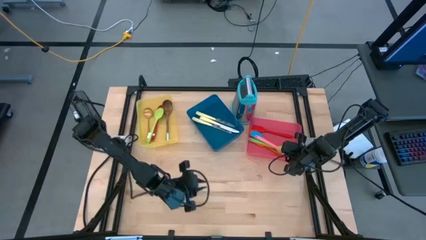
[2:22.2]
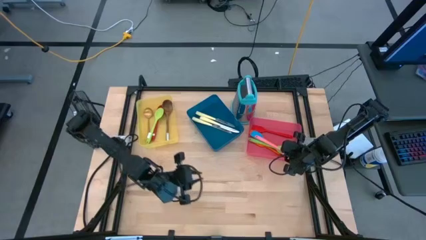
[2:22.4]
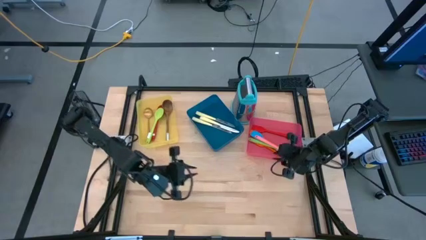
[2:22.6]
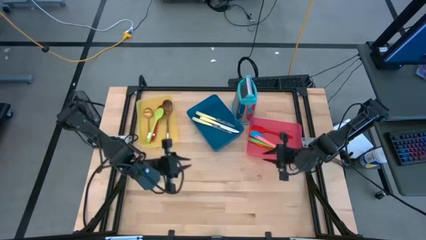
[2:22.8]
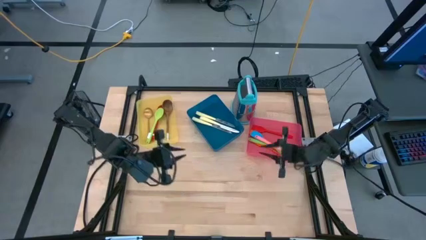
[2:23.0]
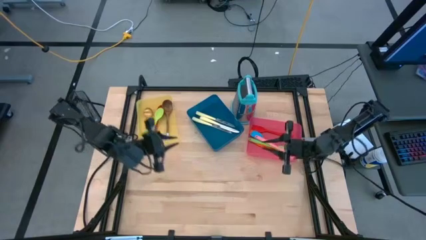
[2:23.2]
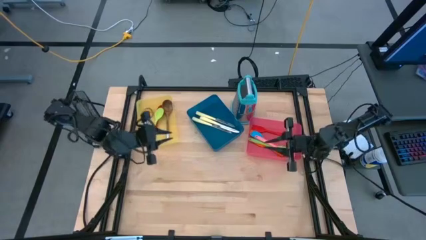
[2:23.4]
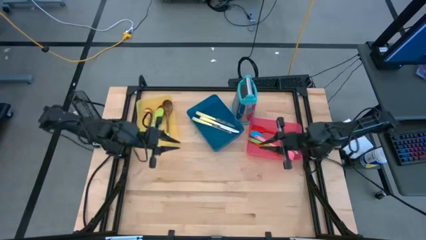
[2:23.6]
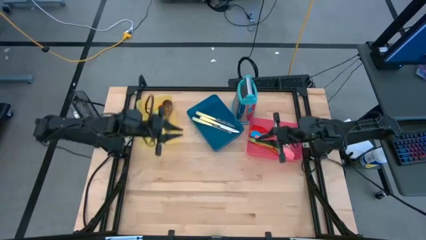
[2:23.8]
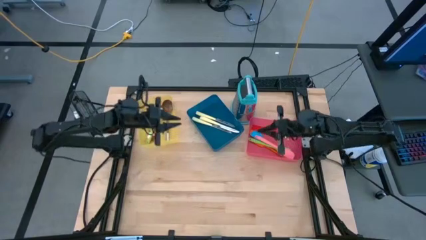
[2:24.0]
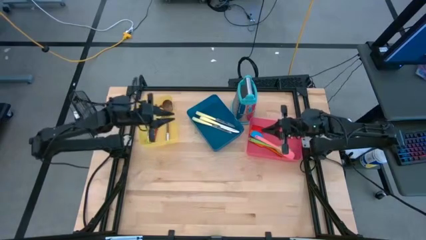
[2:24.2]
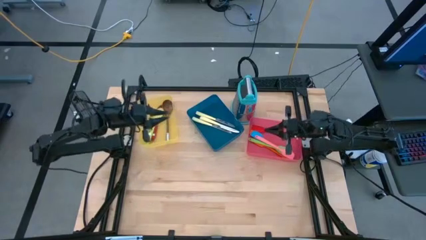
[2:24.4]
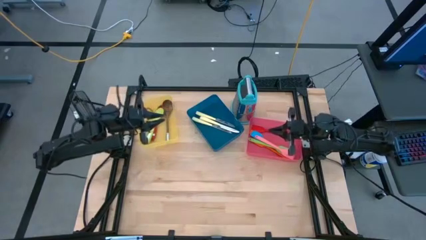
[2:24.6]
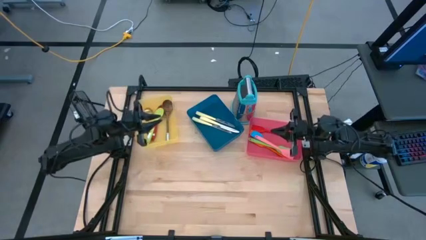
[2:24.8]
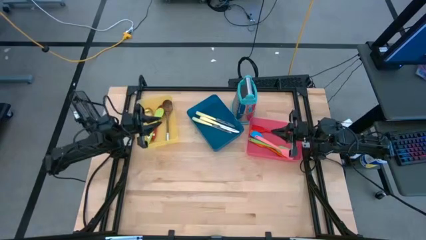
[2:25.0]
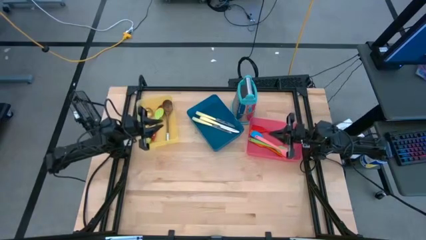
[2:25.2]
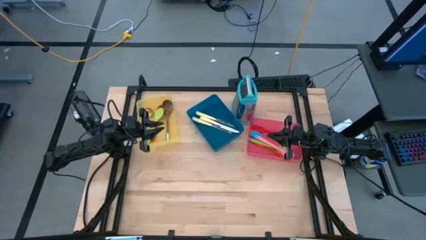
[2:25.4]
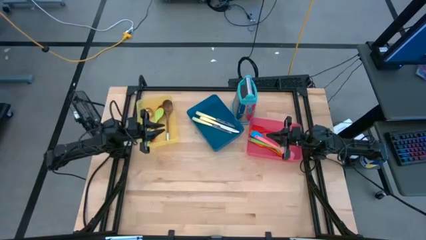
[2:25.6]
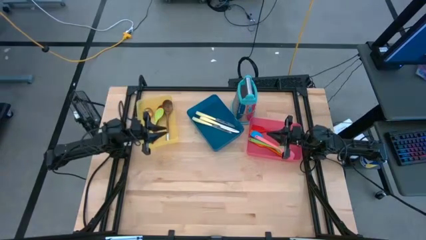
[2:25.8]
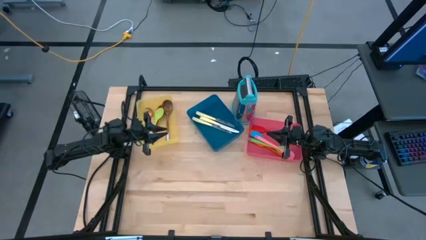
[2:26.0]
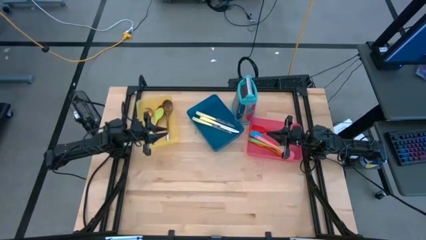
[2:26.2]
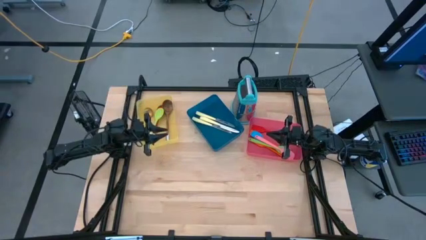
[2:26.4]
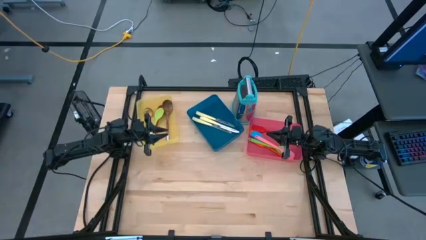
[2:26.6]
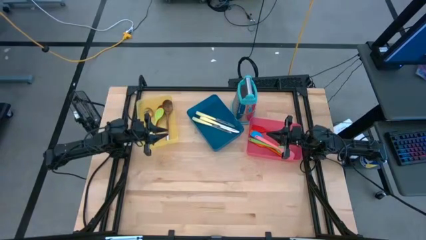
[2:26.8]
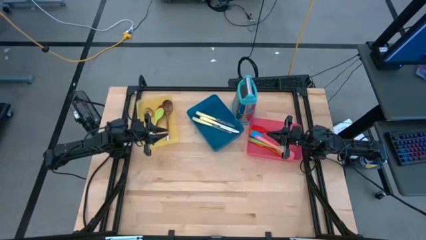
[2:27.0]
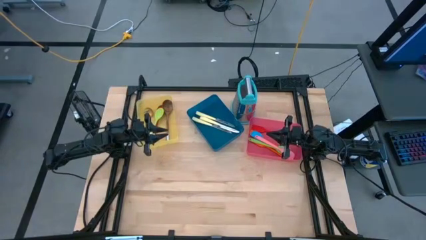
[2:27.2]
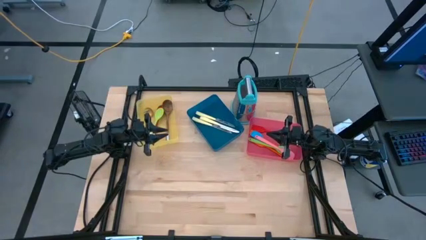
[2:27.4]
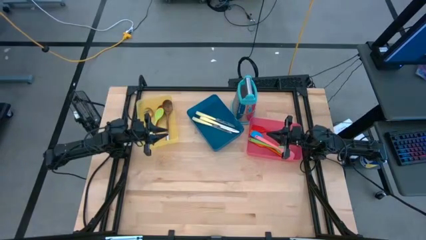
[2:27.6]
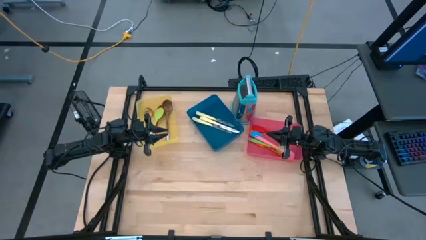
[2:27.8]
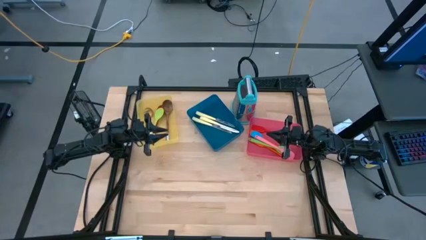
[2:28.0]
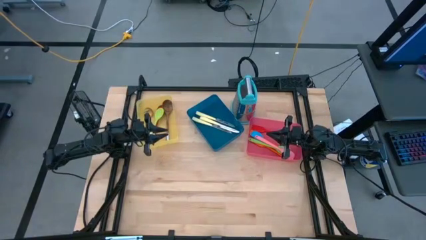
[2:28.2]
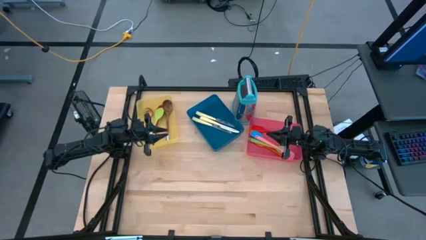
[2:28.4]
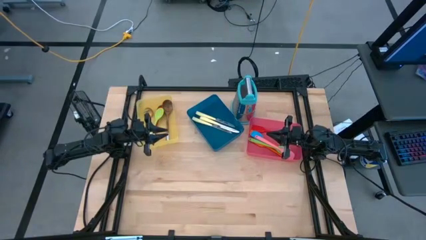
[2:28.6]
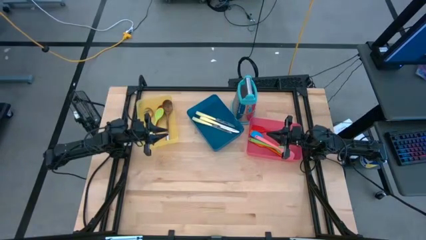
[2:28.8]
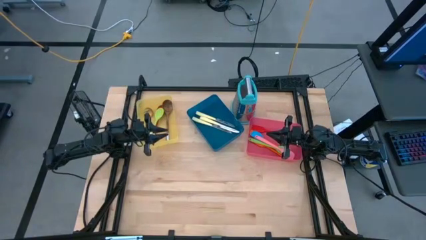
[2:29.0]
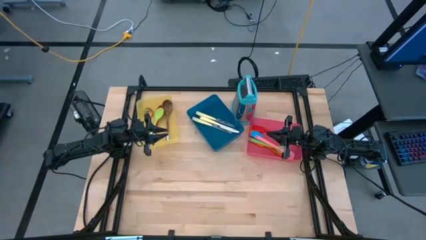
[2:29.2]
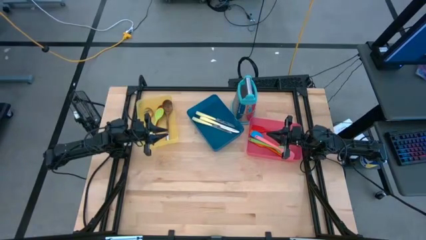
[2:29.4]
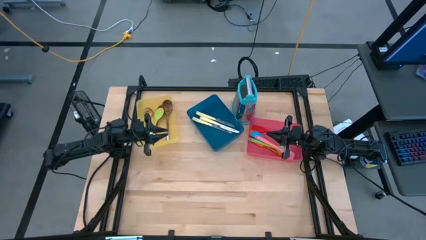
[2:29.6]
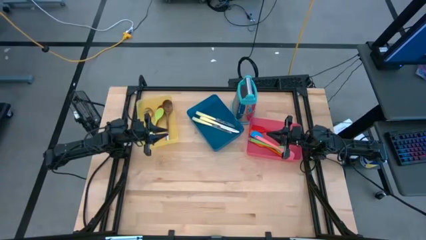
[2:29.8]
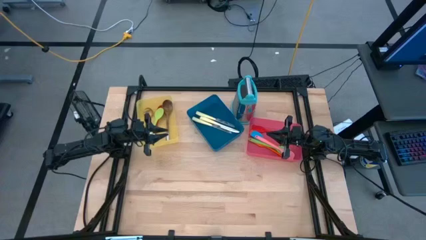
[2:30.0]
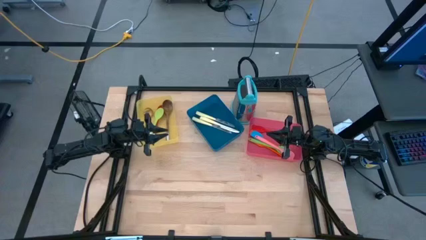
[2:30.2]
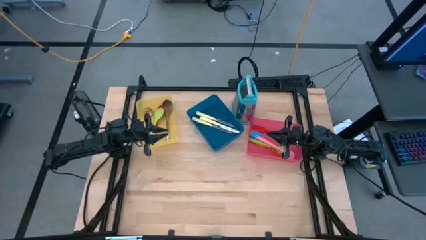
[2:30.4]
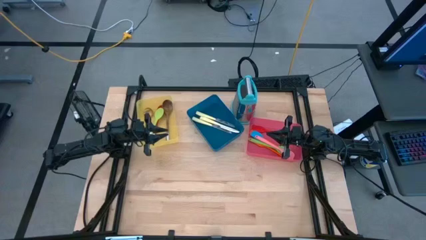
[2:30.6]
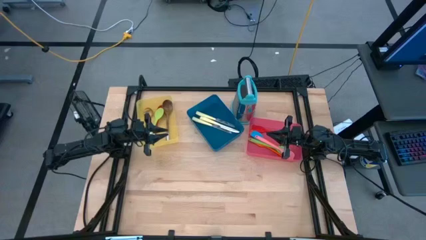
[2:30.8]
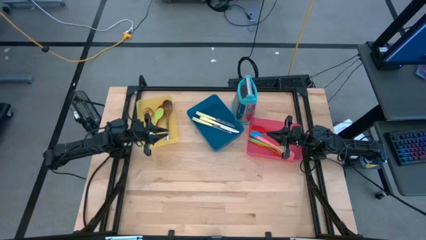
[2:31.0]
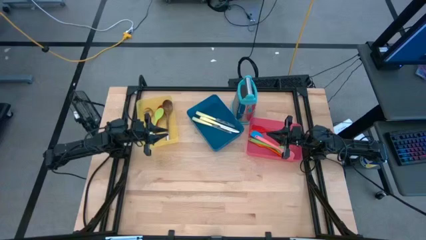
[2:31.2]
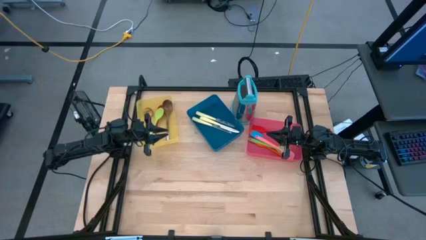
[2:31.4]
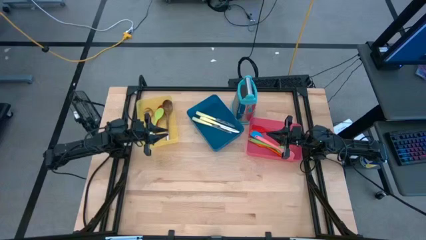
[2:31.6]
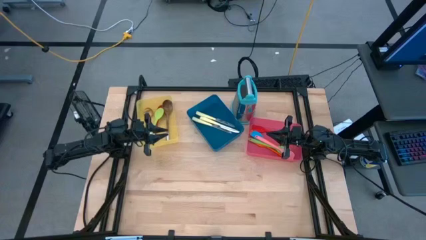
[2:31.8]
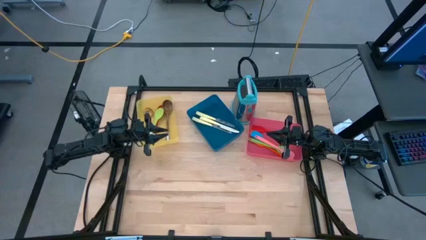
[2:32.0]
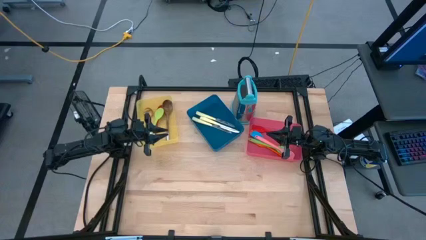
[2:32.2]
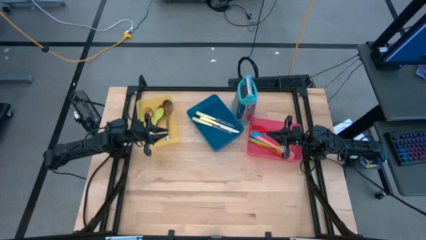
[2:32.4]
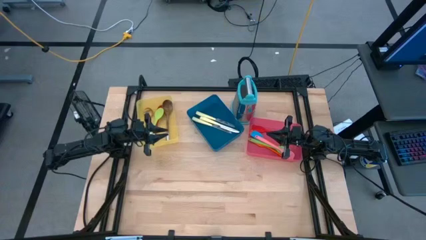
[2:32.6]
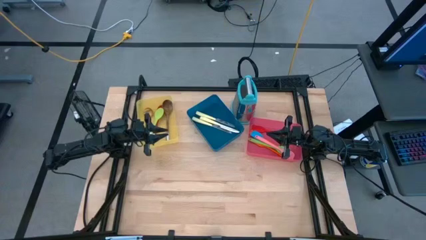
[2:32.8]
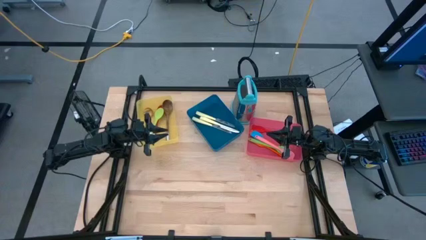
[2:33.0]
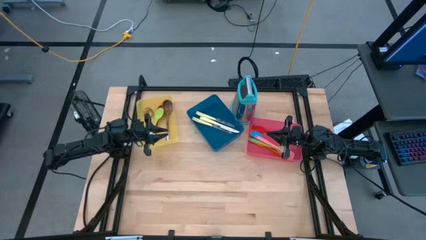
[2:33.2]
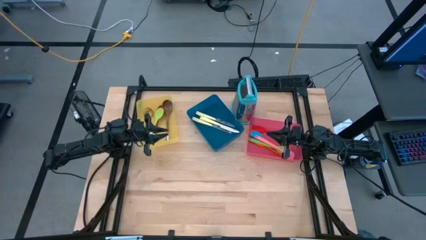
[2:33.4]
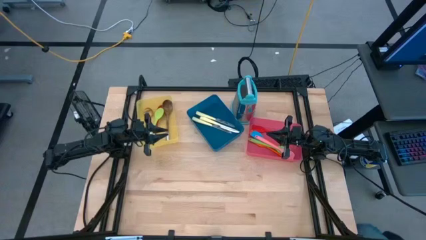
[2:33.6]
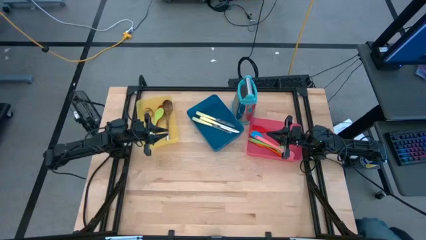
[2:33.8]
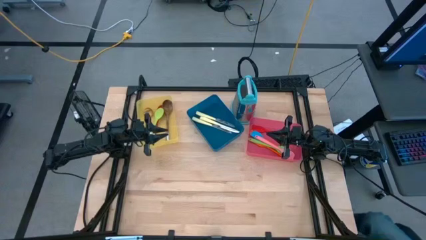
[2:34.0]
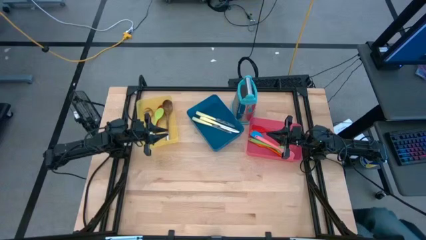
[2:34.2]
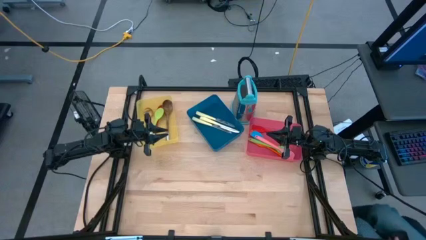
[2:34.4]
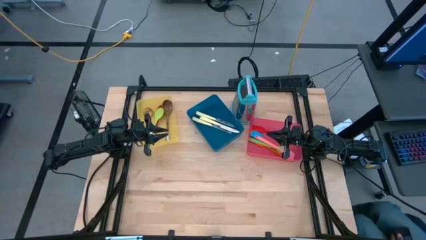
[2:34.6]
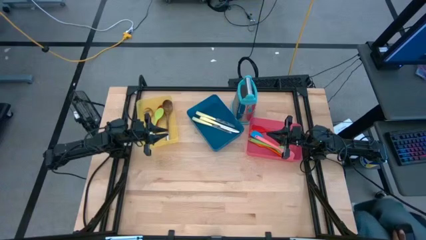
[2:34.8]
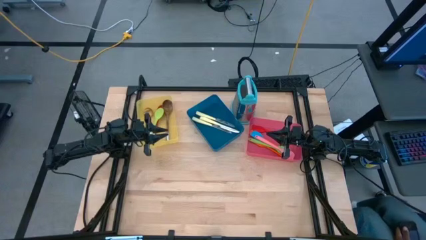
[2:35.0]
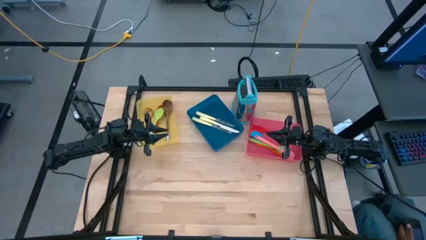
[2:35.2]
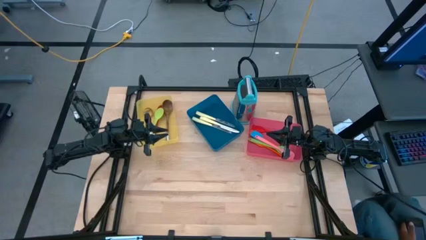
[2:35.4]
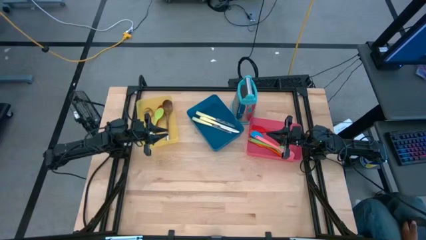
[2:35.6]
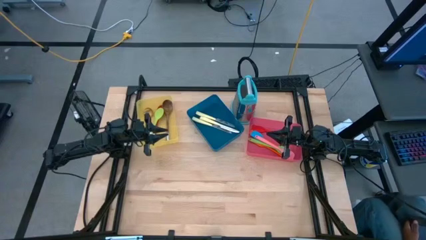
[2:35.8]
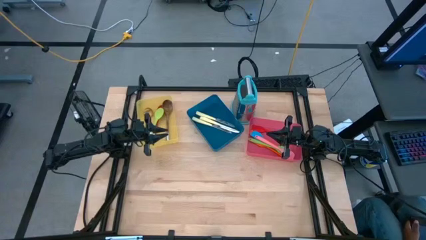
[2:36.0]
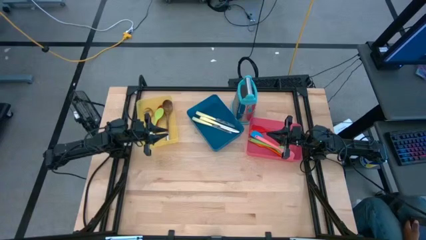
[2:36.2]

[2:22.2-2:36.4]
Task: Pick & Place Kitchen Items
Return to Home Position

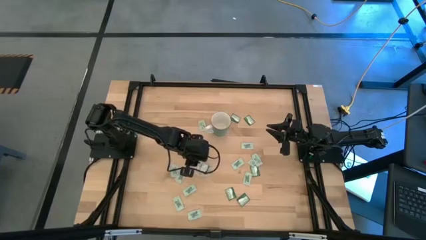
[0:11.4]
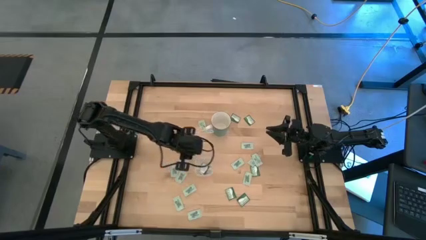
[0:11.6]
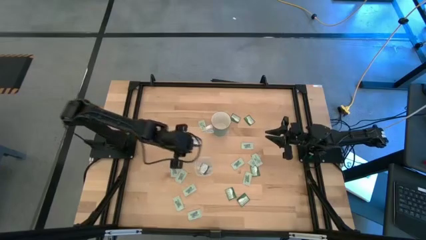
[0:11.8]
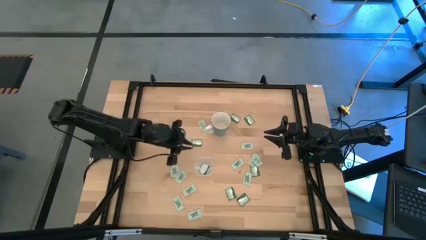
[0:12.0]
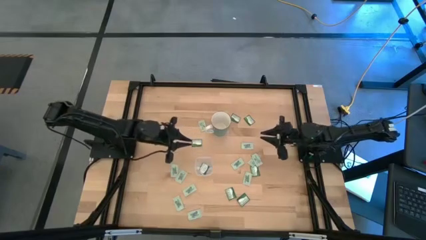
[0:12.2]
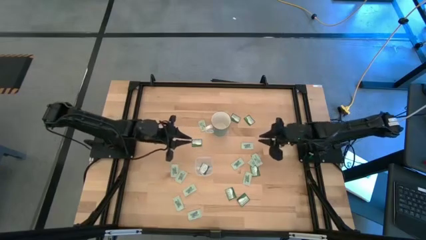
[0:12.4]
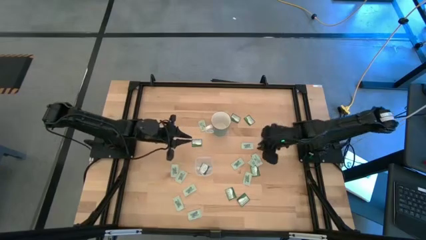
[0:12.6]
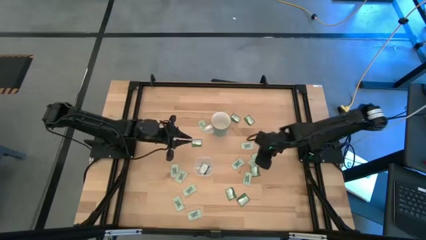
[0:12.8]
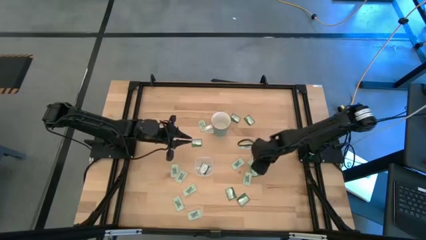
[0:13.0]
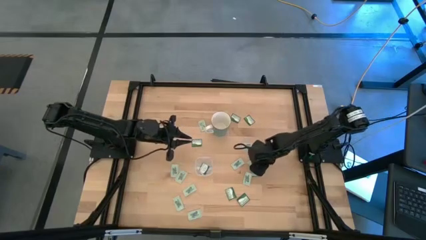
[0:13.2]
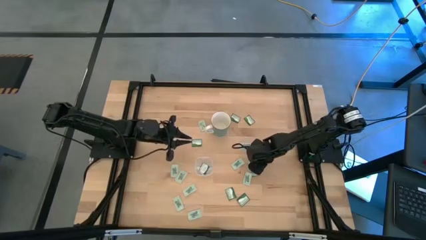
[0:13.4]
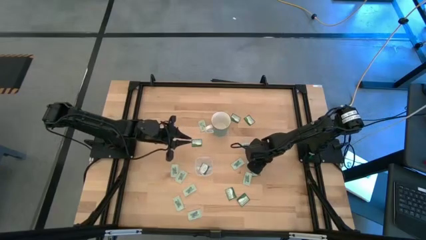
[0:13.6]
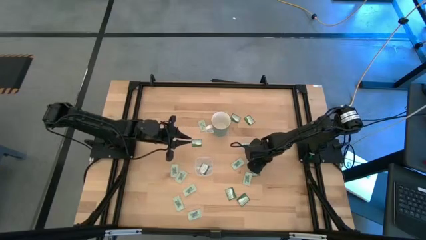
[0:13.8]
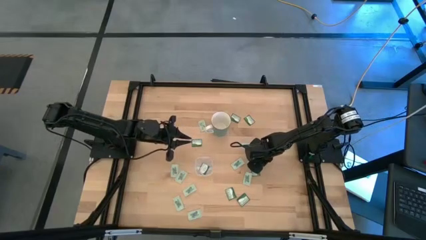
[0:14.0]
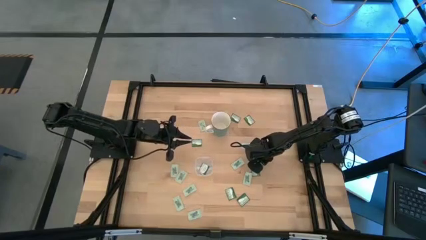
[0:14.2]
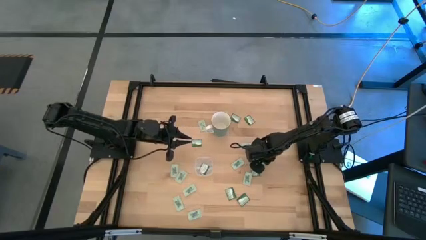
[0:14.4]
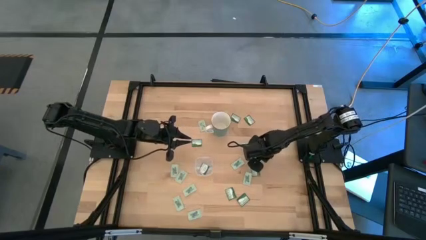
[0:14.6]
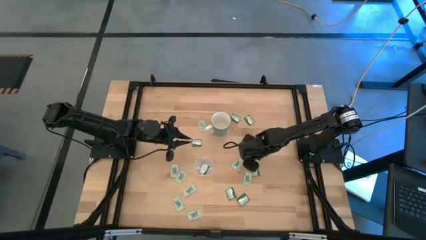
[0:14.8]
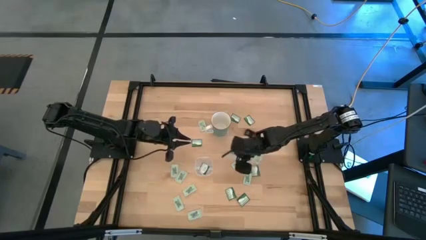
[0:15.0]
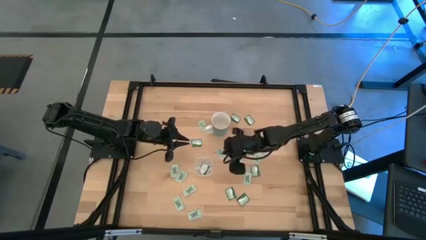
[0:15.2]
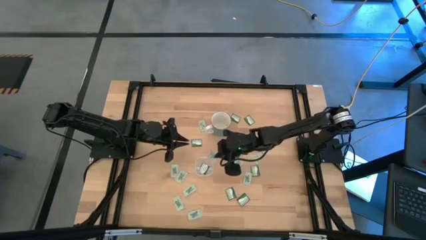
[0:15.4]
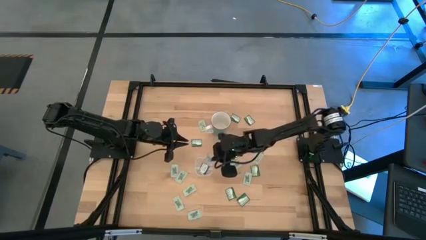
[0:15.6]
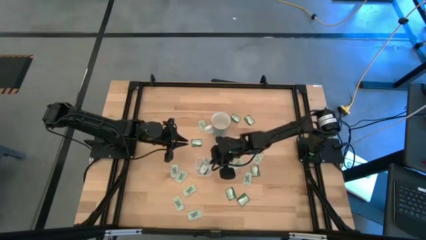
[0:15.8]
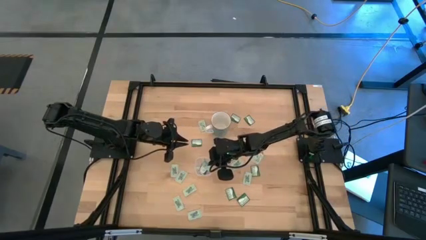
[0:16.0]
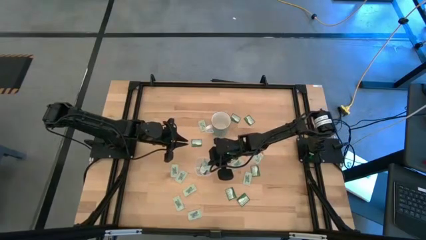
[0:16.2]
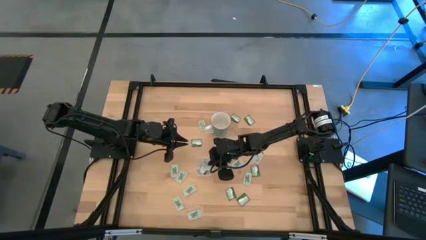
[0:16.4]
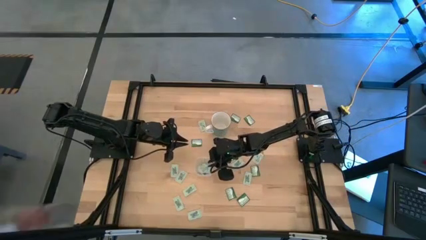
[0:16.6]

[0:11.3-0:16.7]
Task: Pick and place Stevia / Truvia into bins
Put the white stevia packet into the transparent bin
